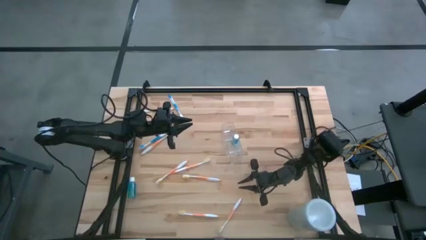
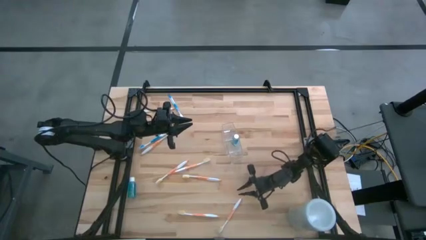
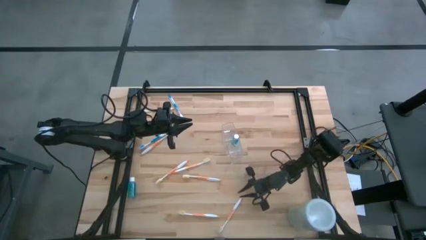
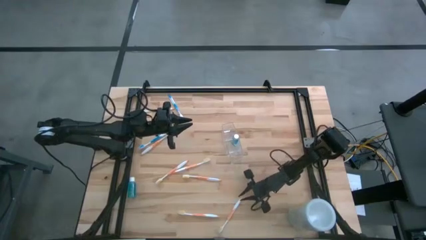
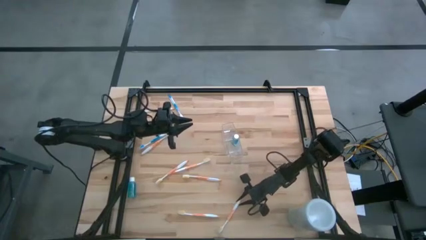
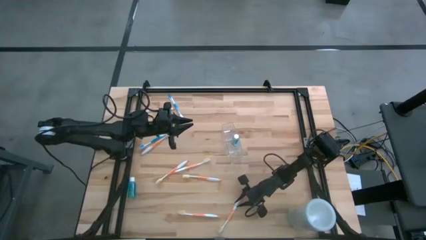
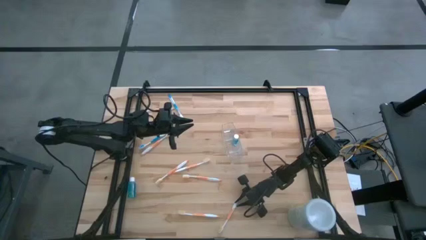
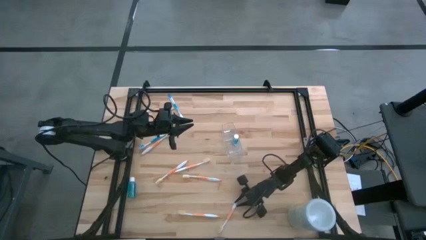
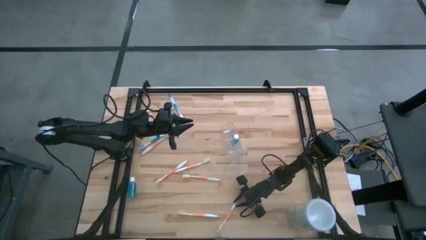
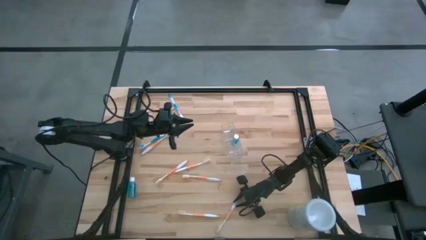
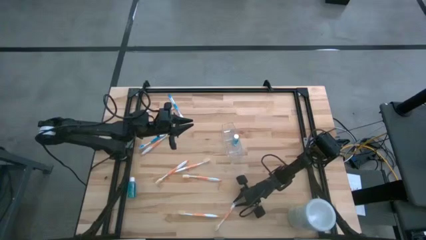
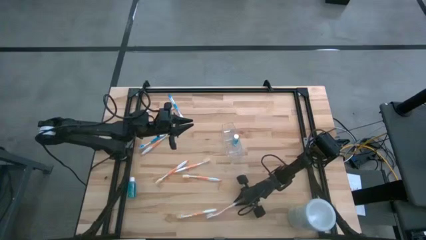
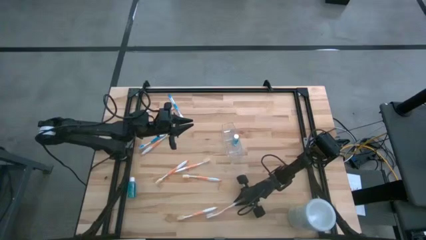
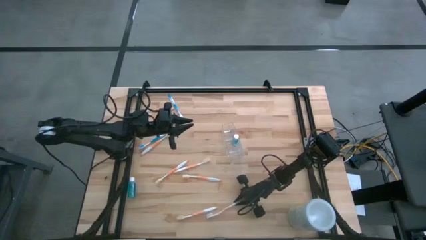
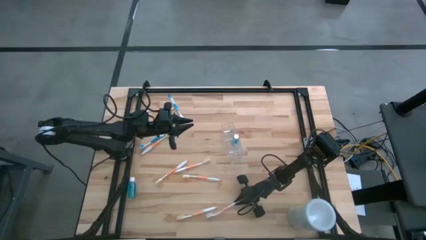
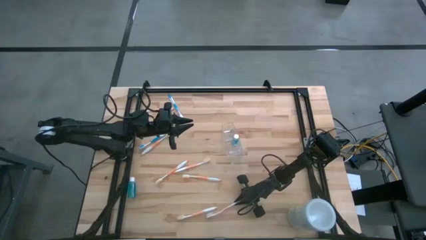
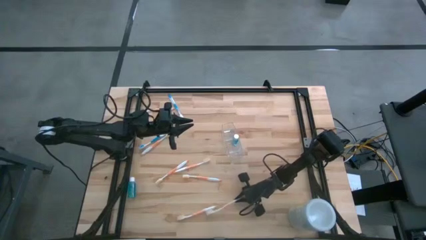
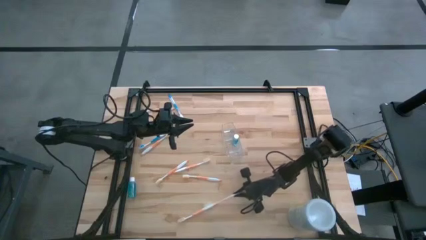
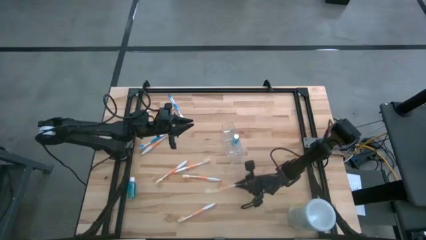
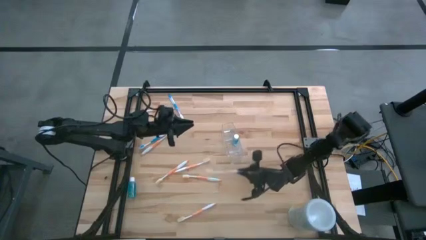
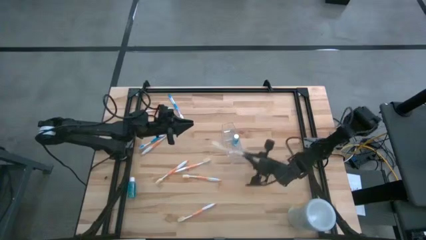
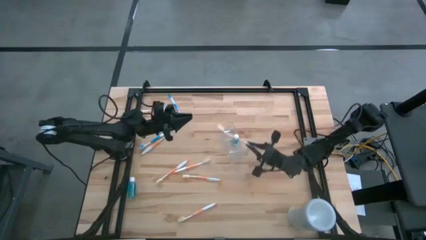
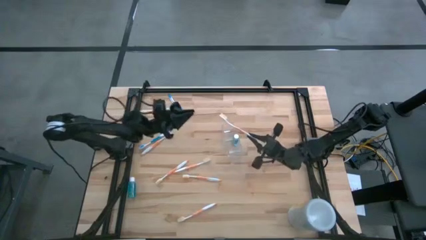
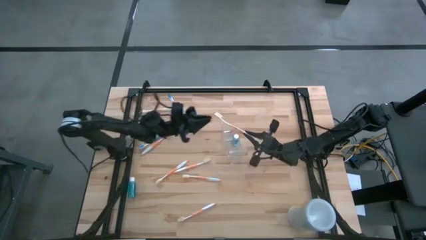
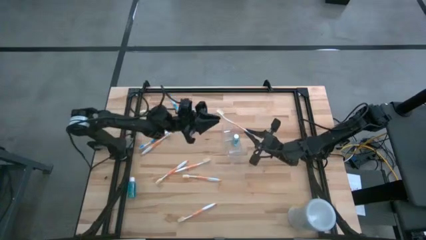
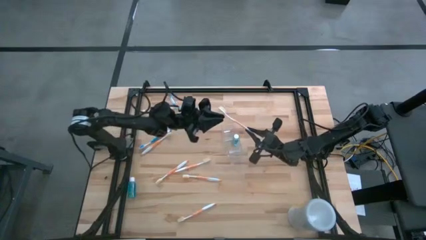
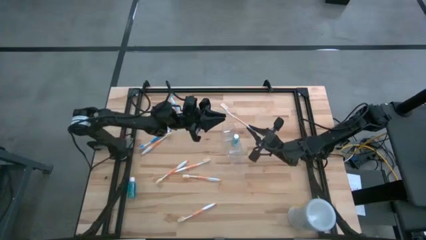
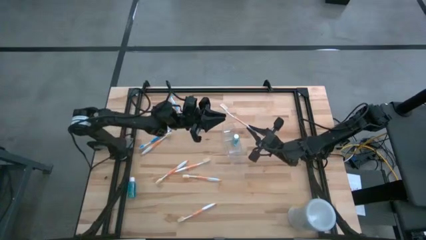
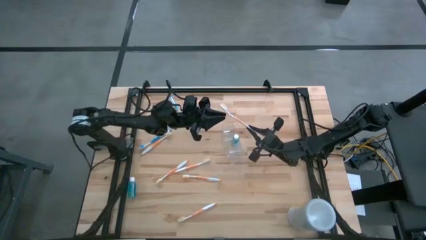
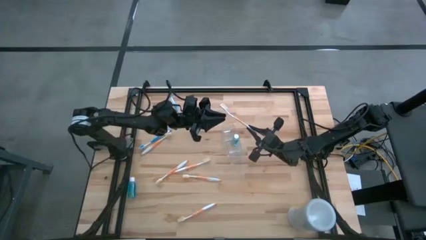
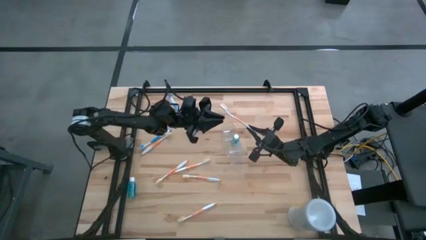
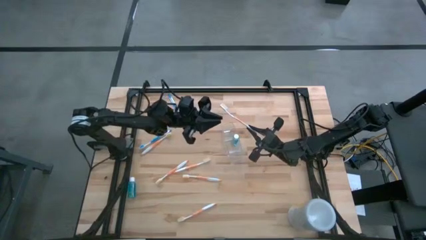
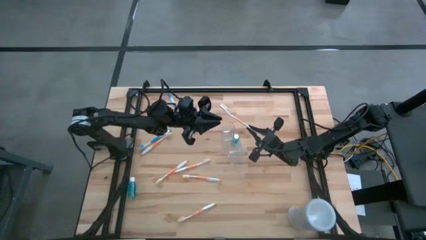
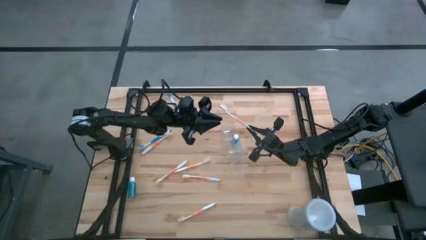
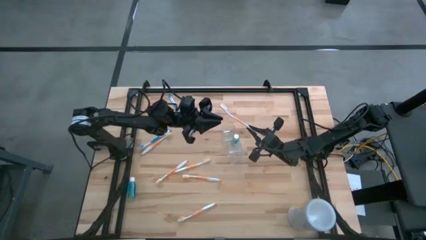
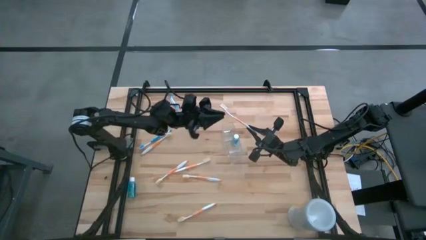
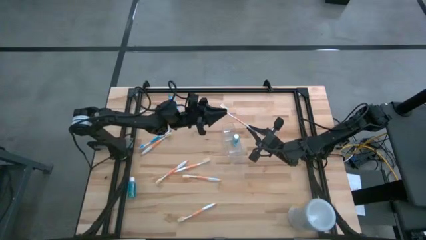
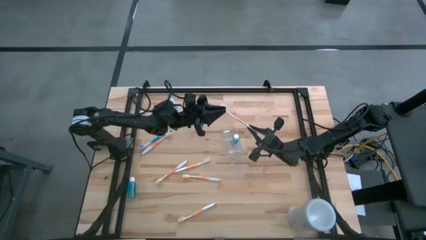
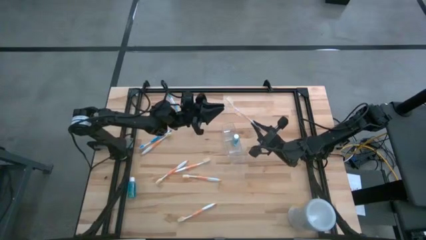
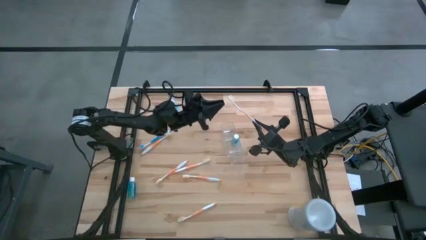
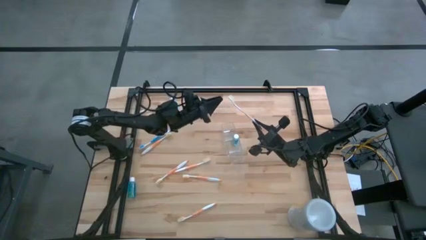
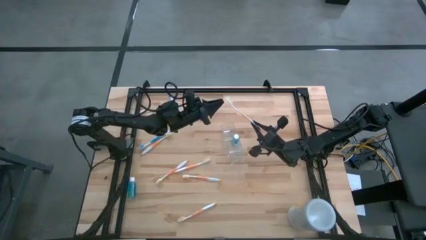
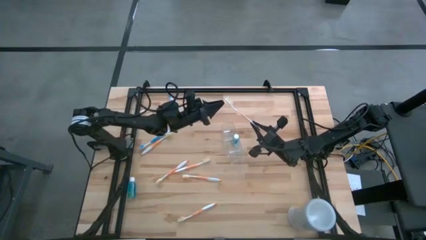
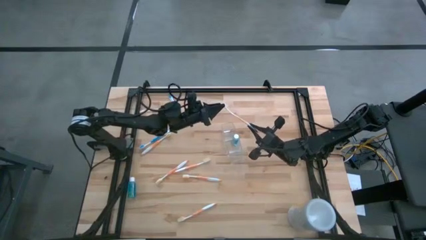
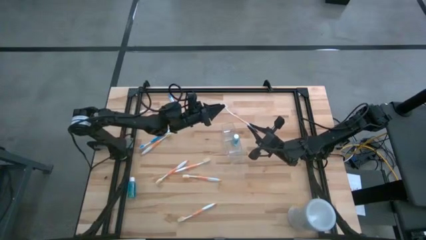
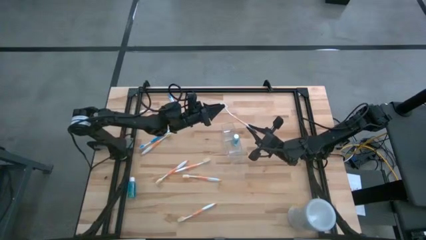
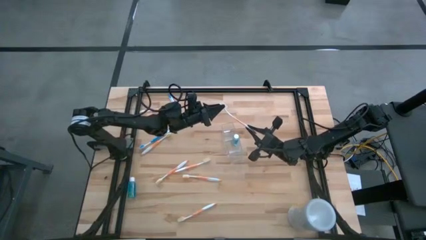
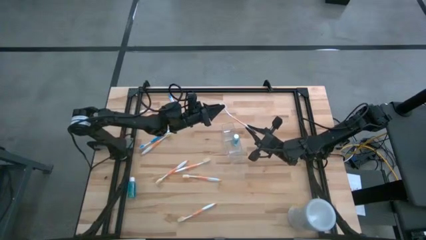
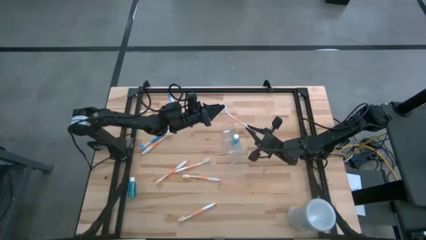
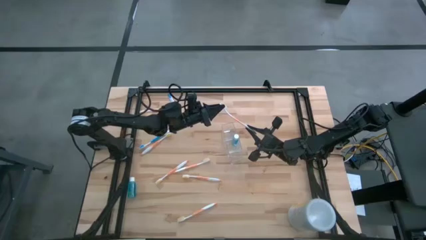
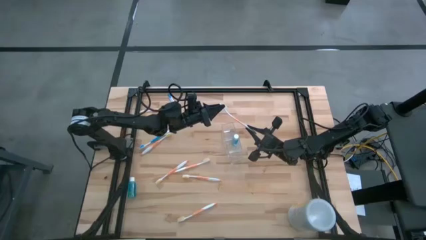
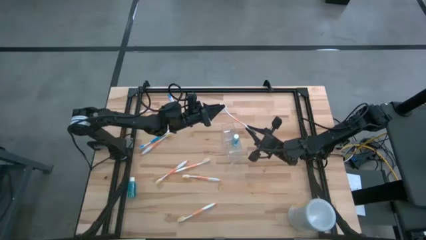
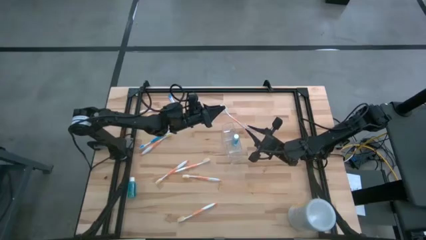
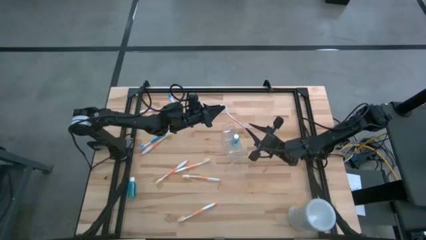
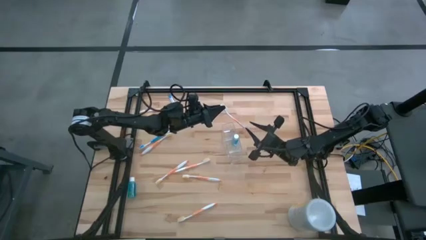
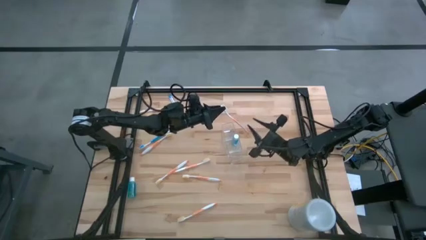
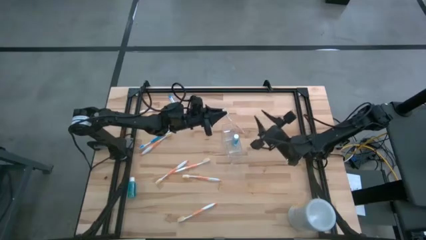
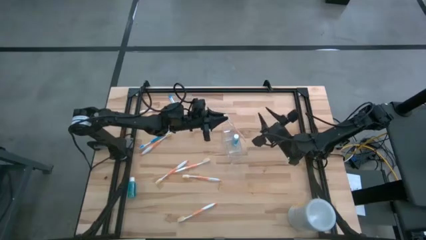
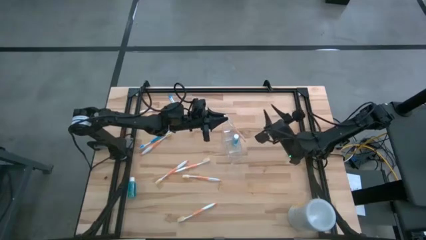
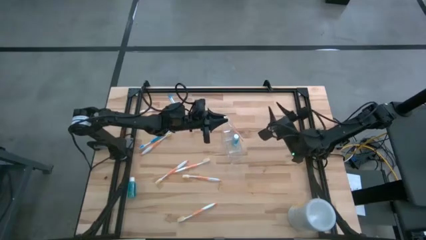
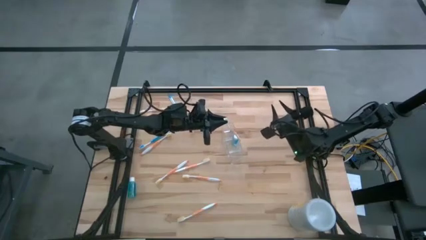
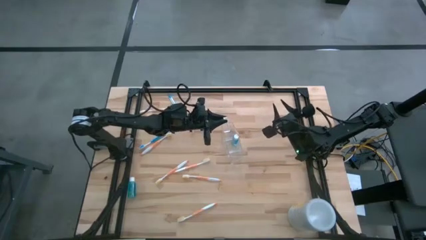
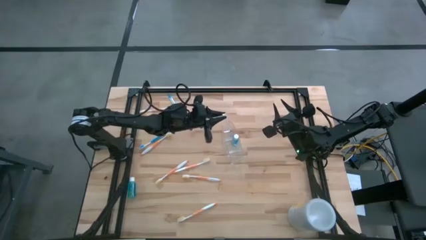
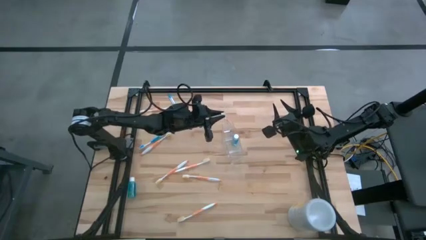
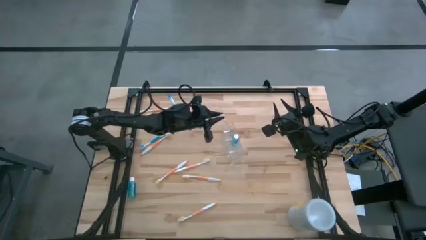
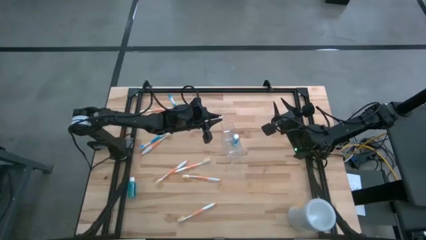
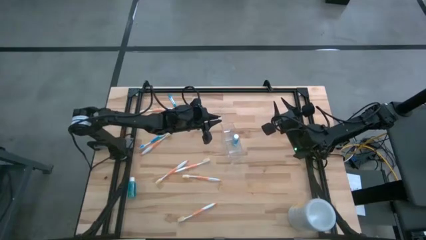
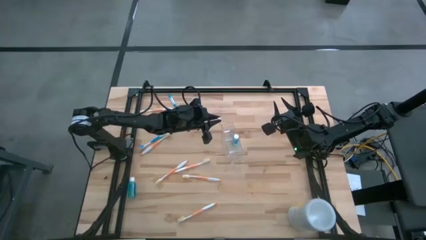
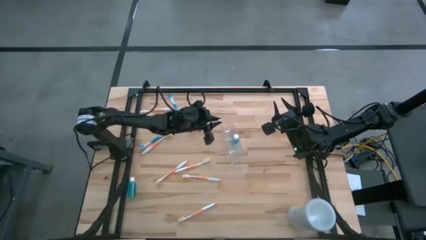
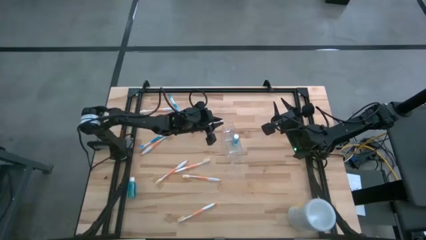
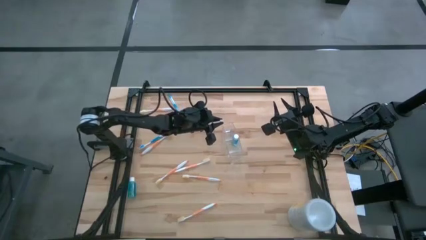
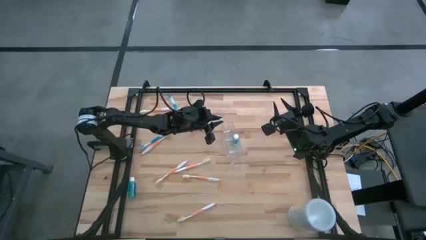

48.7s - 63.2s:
Task: Pick & Place toothbrushing station
Put the orange toothbrush into transparent organizer

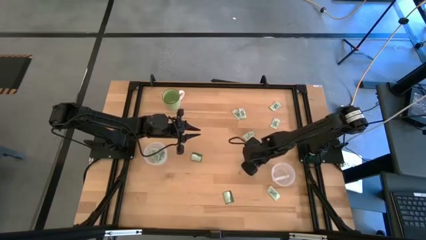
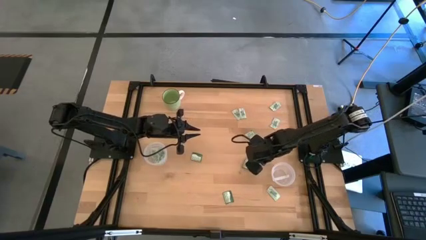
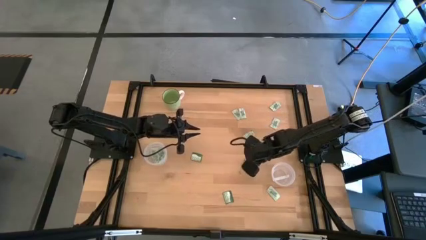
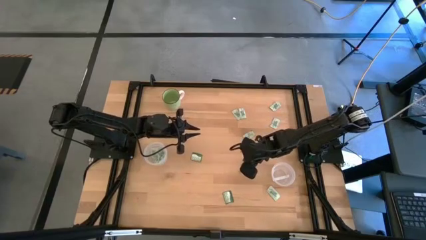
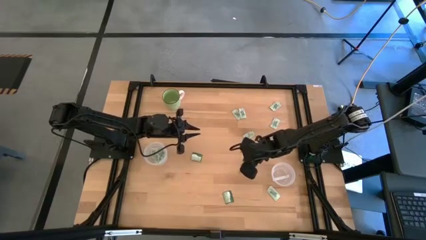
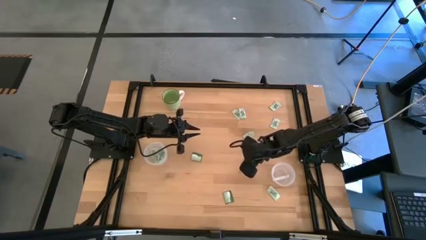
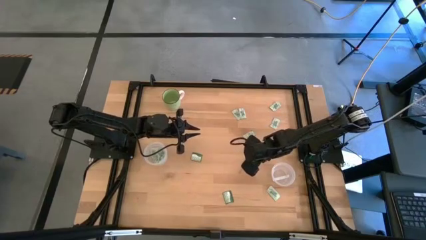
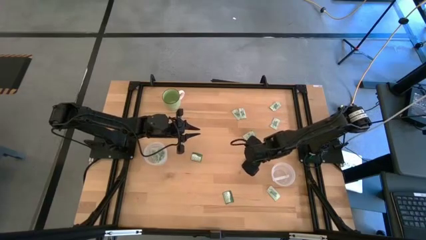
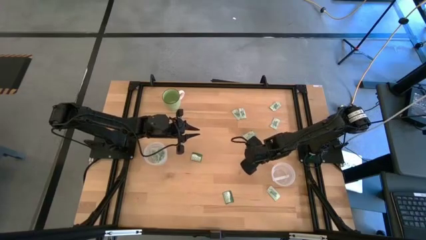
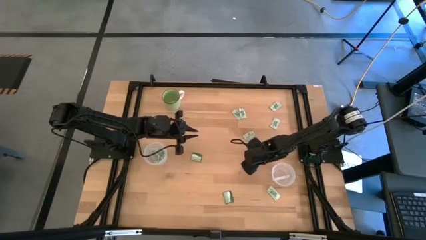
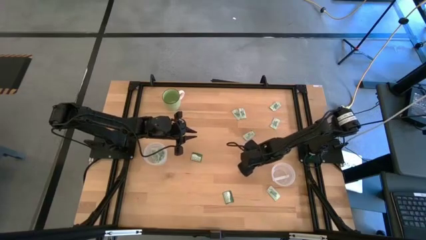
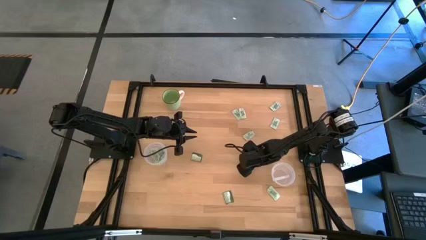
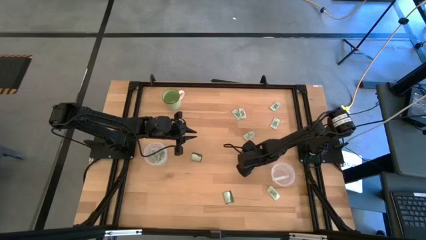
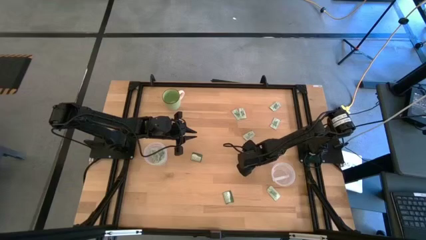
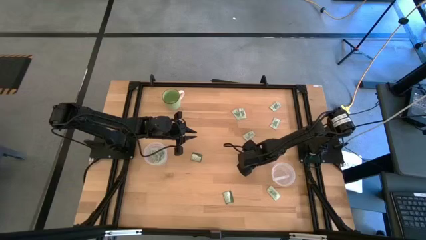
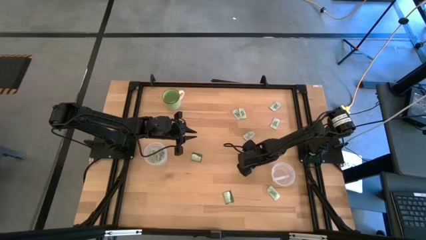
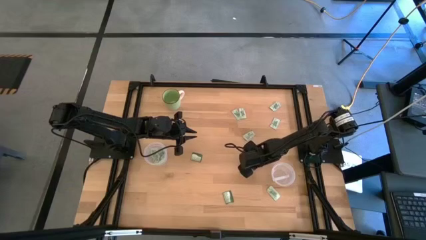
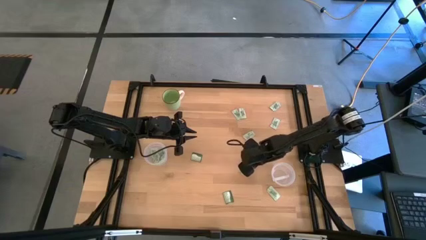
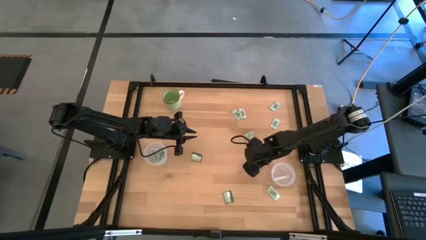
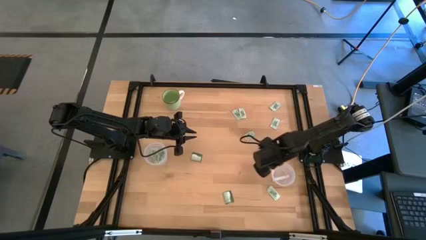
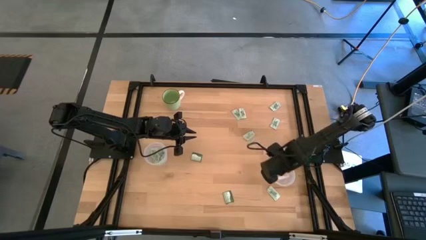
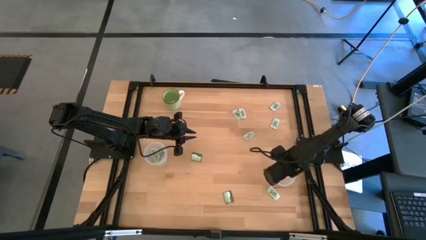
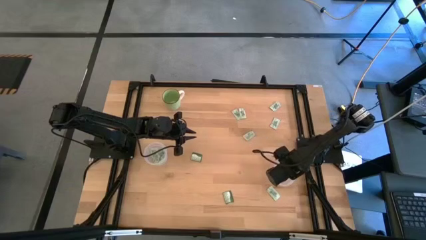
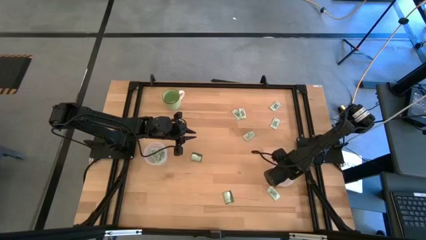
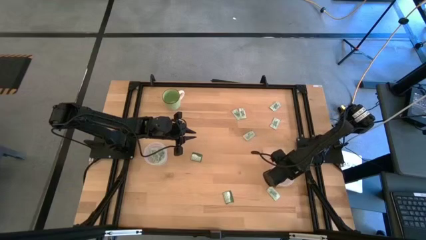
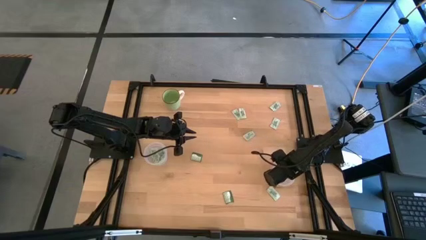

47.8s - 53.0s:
Task: Pick and place items into bin
Put the truvia packet into the right transparent bin
